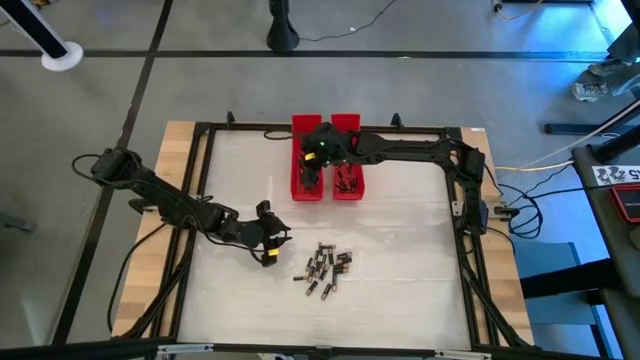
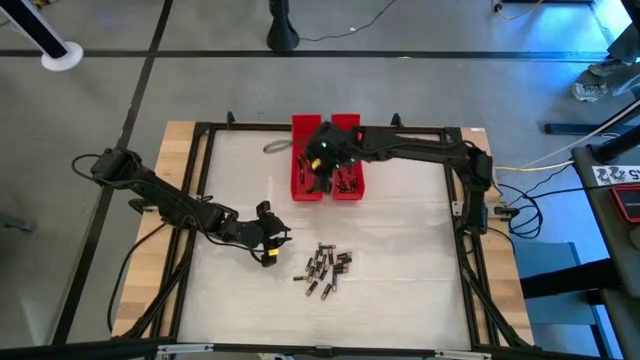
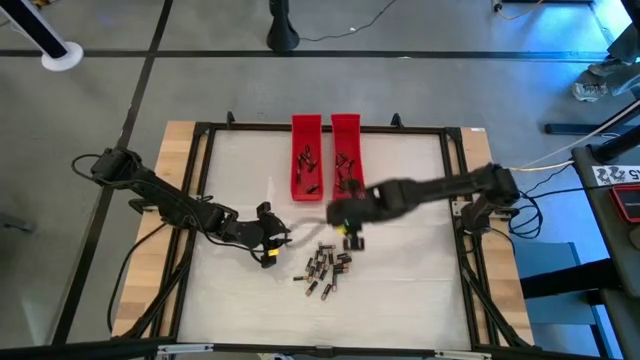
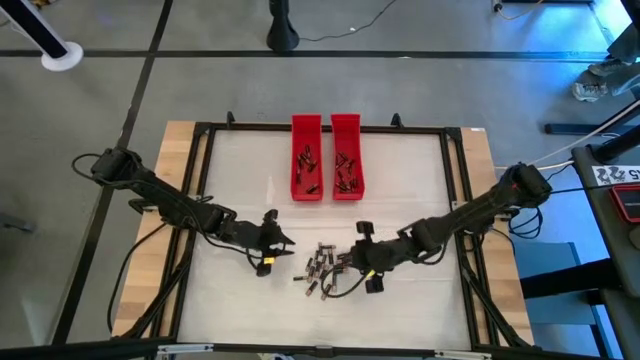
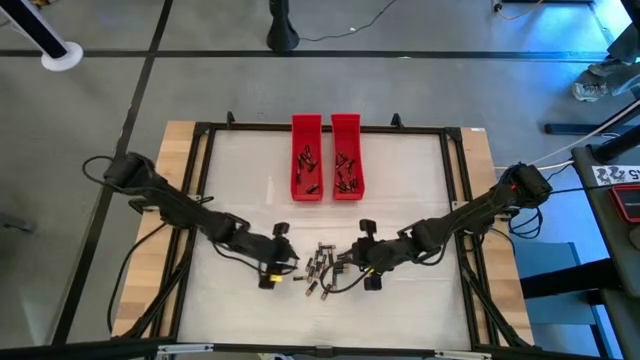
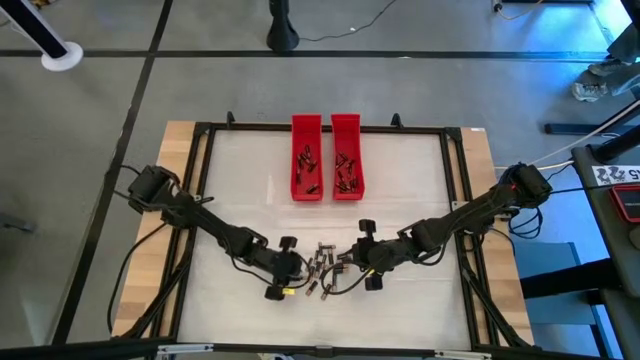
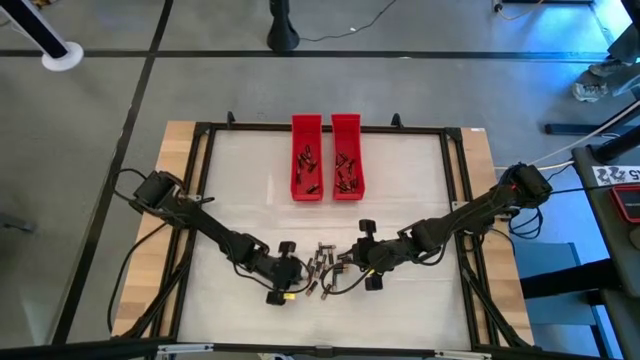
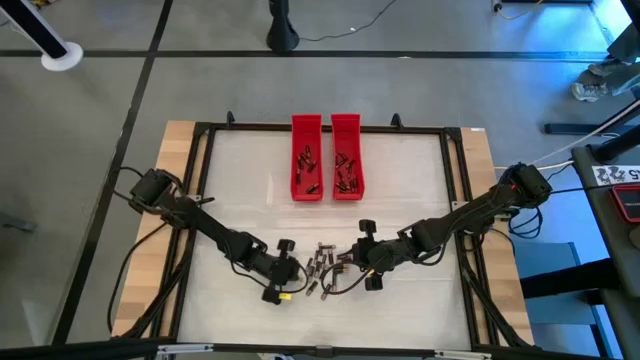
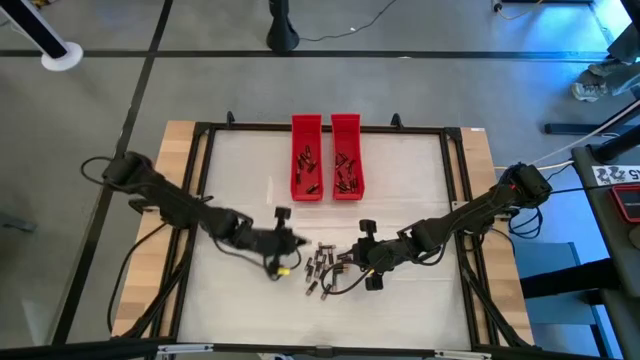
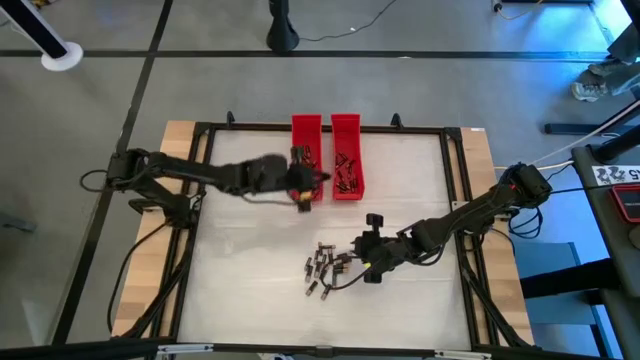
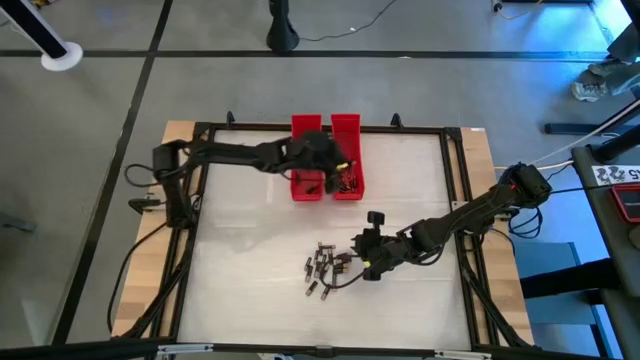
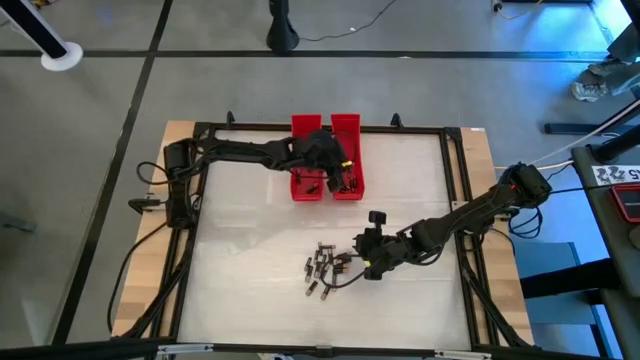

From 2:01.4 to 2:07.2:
Task: Sort batteries
Put the small black battery into the right red bin

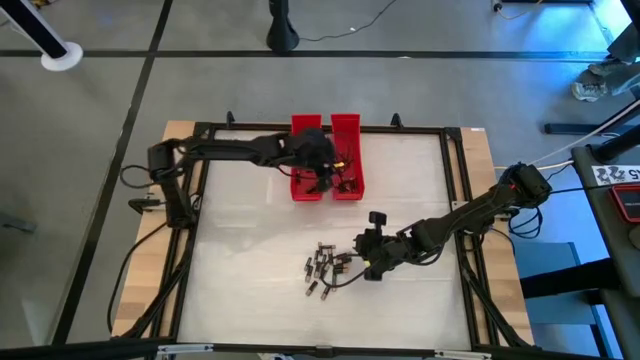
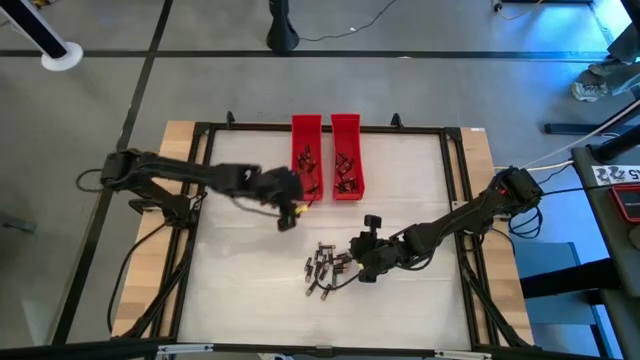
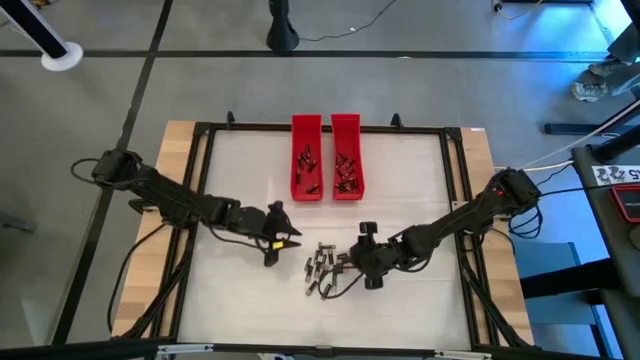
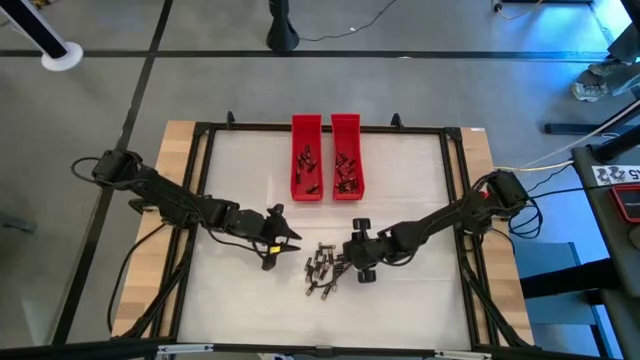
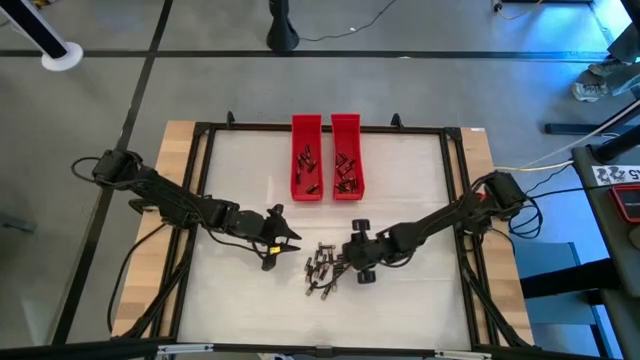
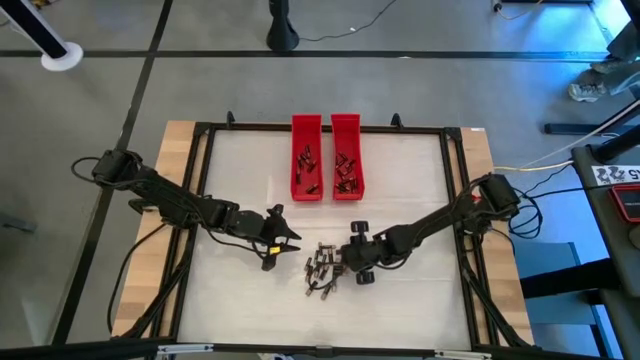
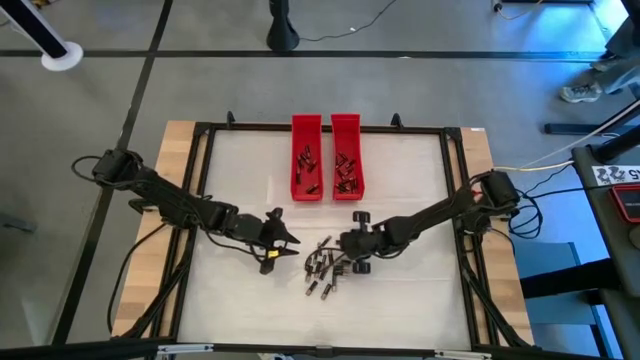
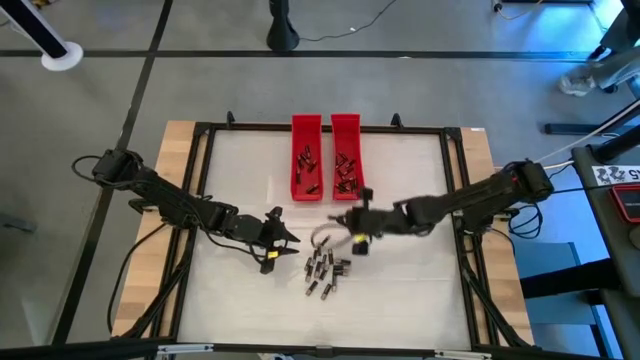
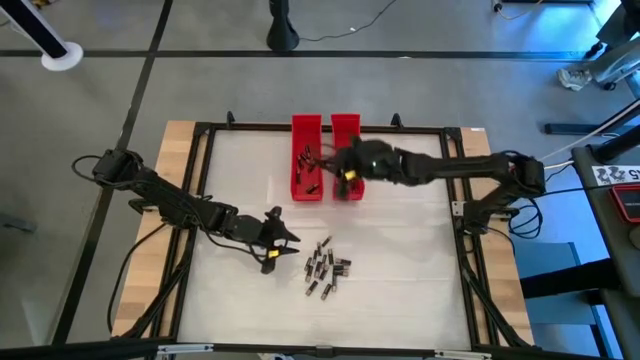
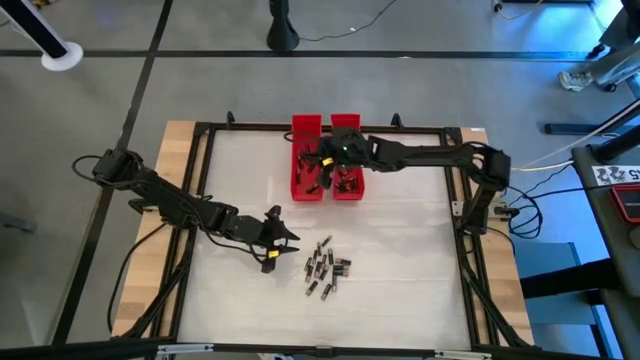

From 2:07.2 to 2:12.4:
Put the large black battery into the left red bin

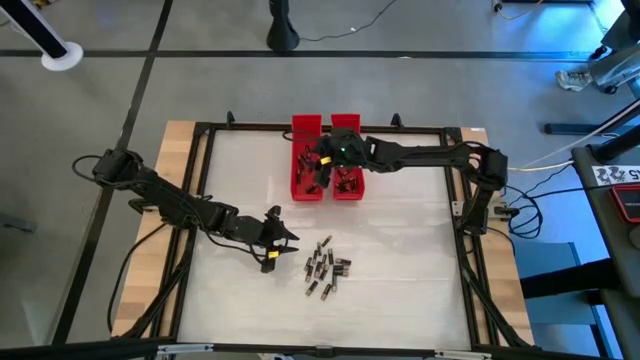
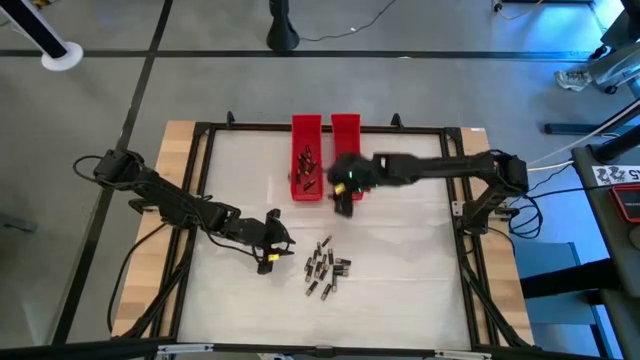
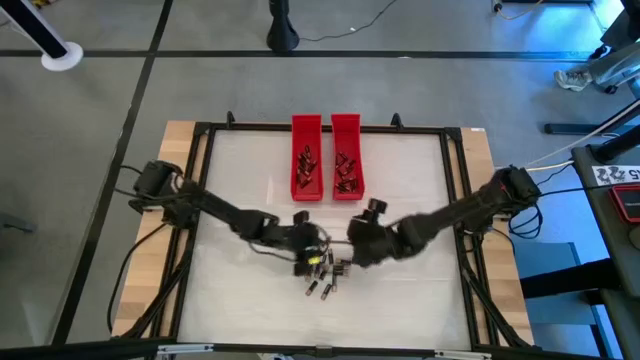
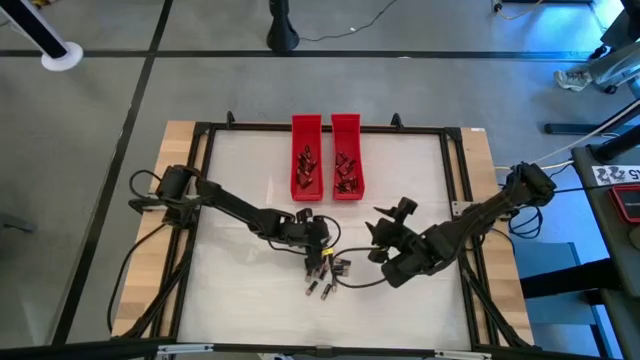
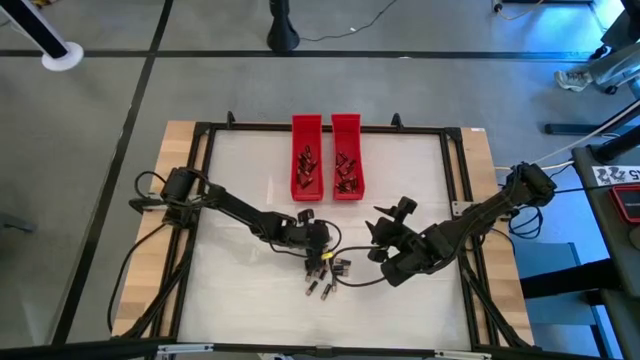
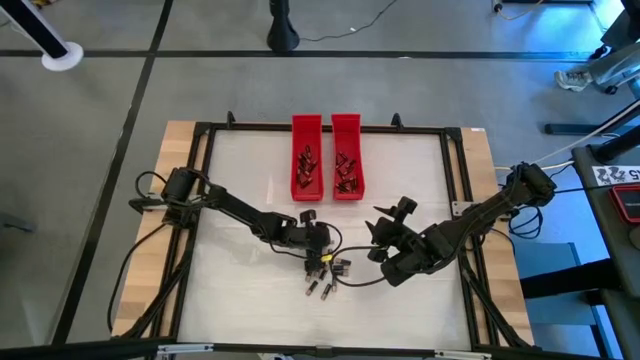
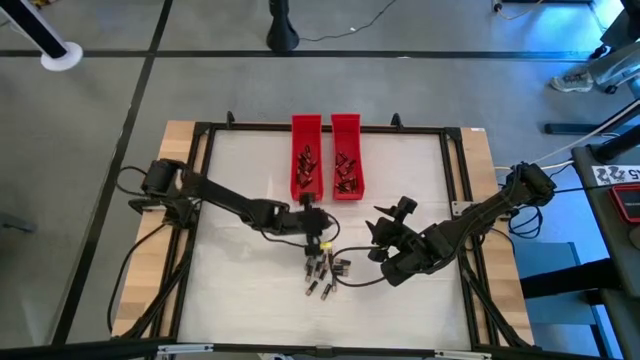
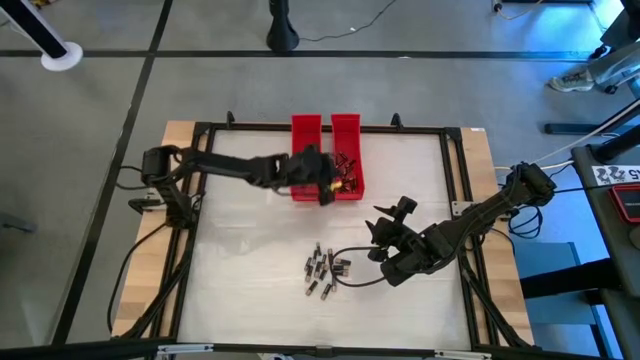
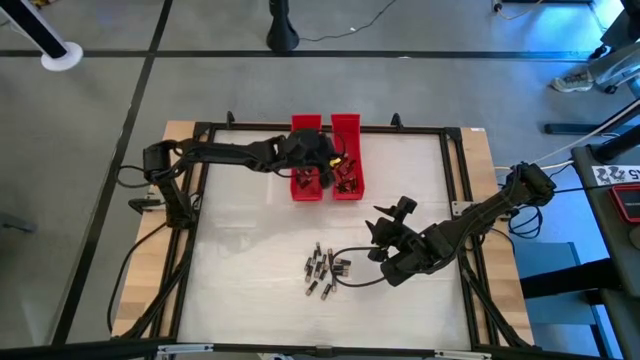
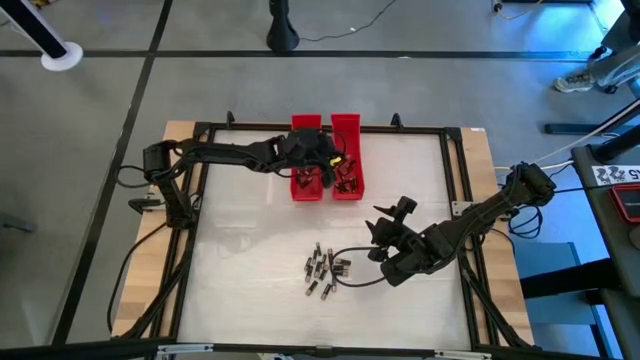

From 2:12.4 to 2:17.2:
Put the small black battery into the right red bin

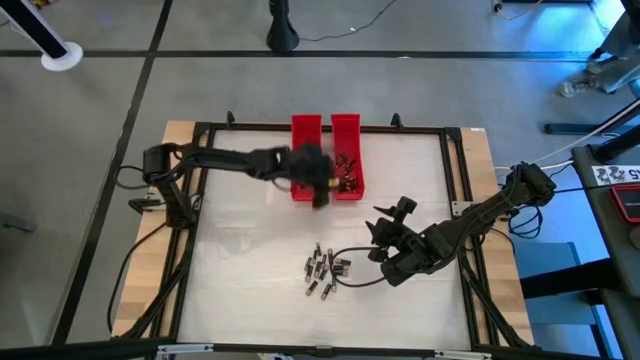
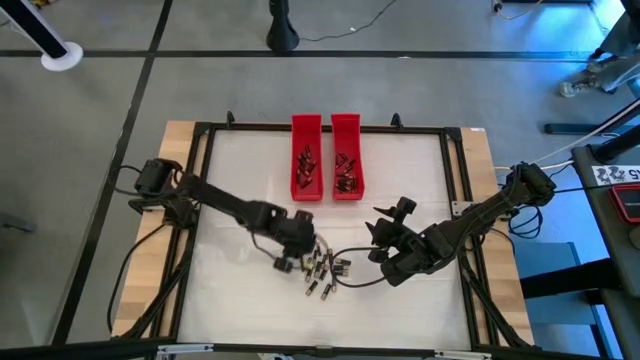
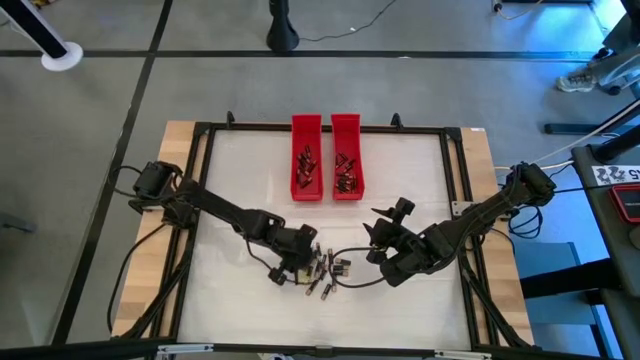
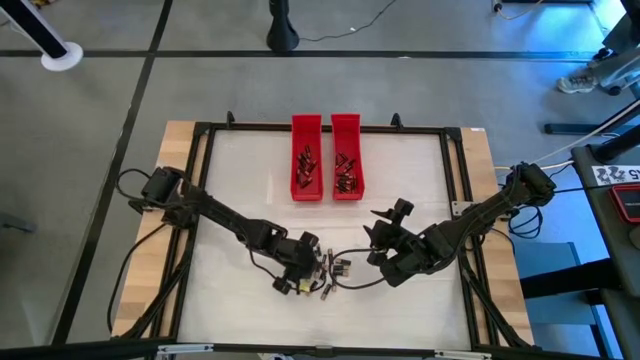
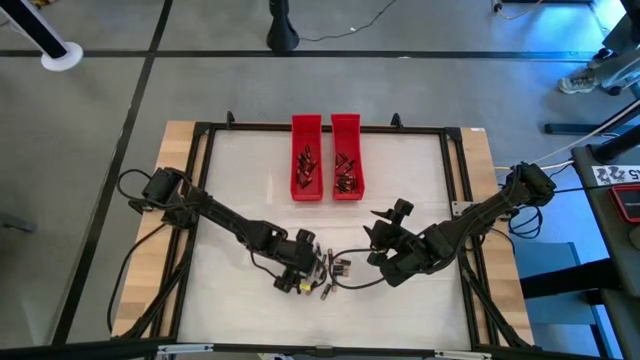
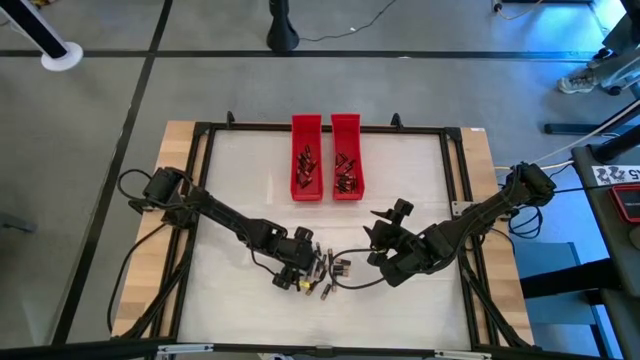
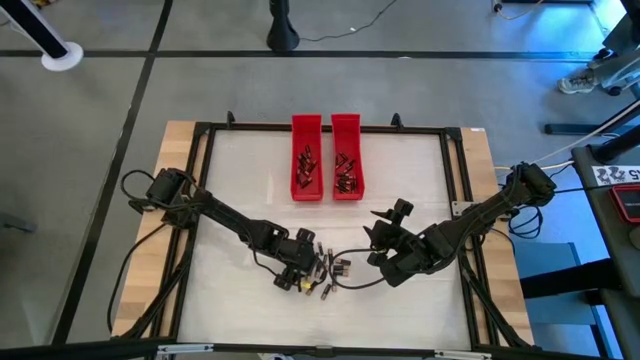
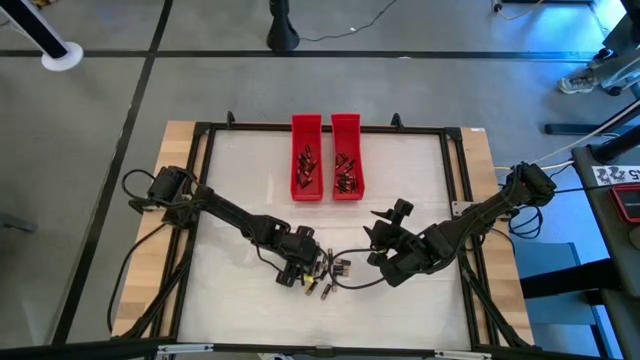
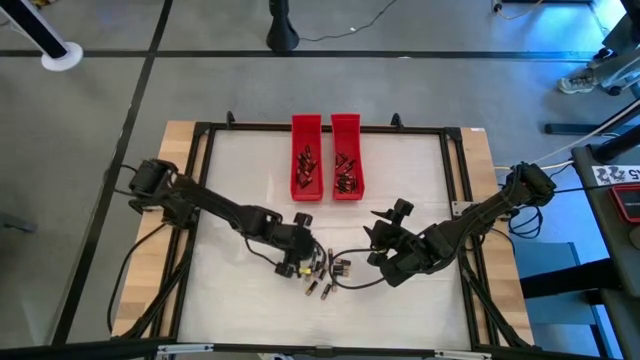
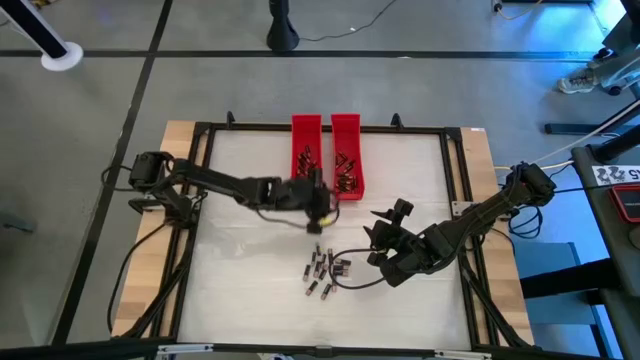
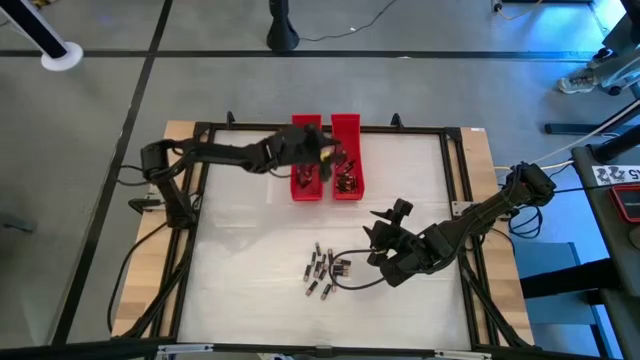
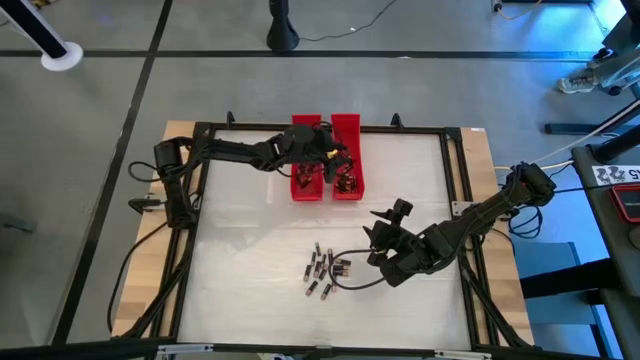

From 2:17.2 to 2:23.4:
Put the small black battery into the right red bin
